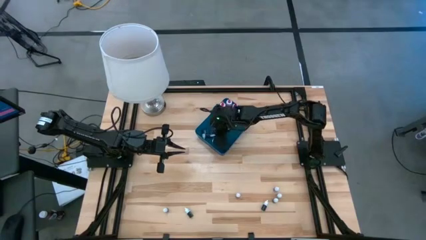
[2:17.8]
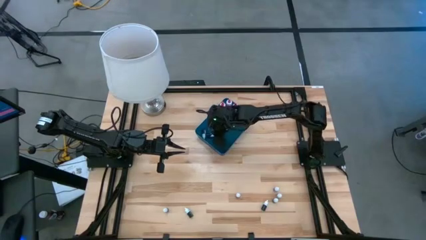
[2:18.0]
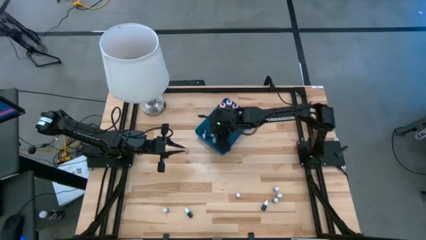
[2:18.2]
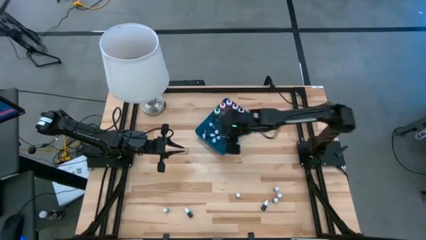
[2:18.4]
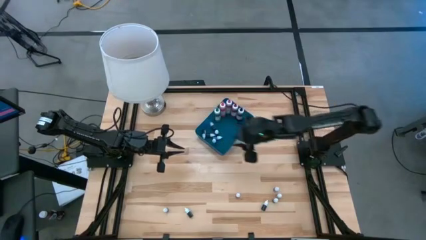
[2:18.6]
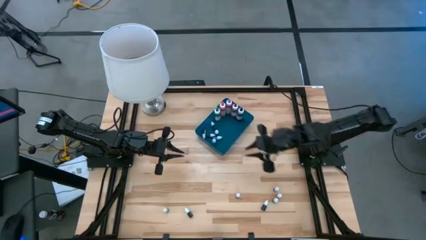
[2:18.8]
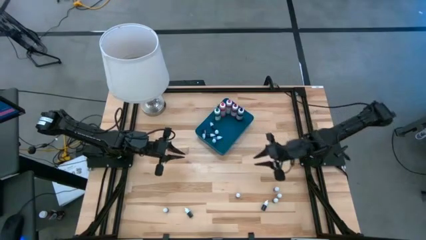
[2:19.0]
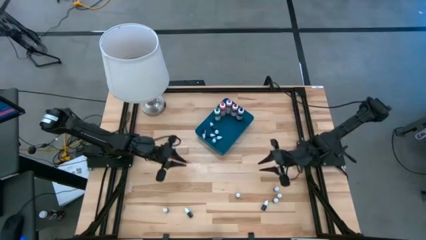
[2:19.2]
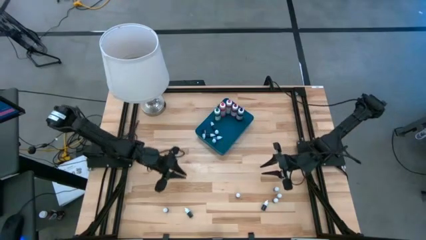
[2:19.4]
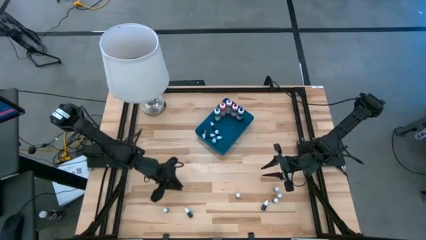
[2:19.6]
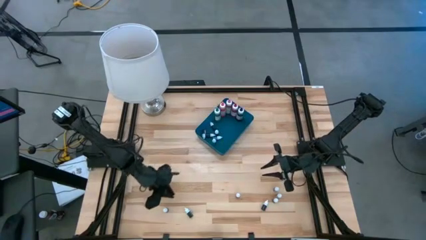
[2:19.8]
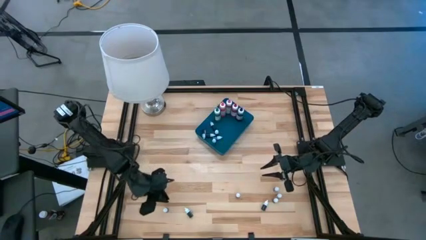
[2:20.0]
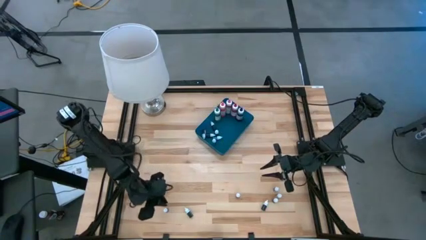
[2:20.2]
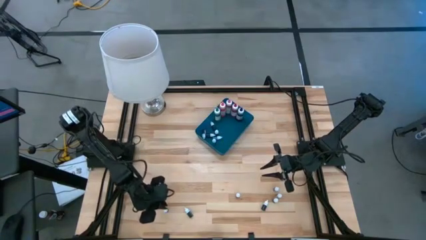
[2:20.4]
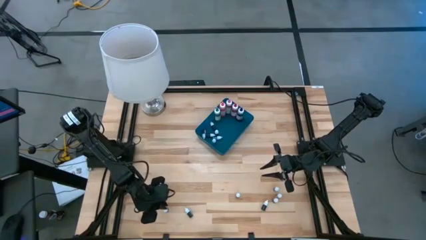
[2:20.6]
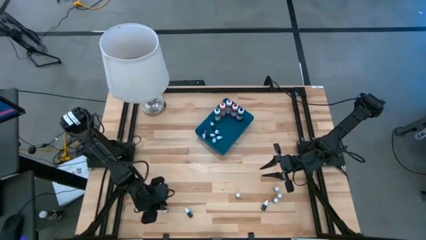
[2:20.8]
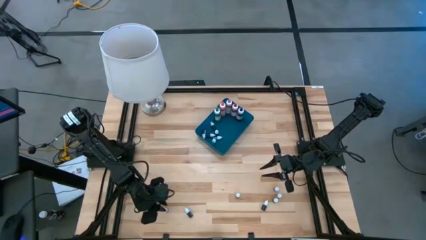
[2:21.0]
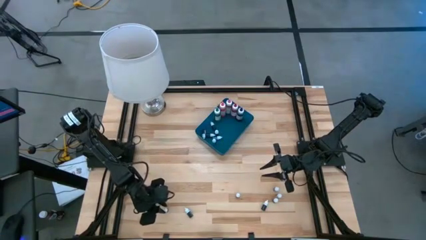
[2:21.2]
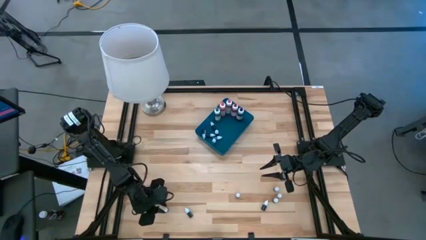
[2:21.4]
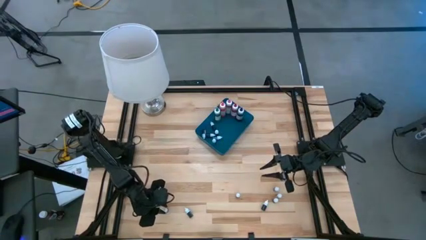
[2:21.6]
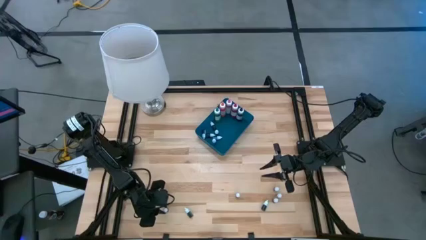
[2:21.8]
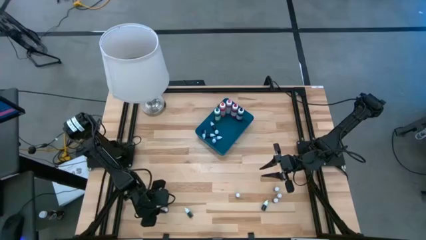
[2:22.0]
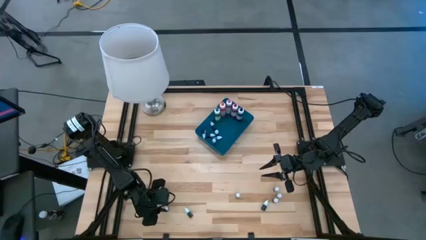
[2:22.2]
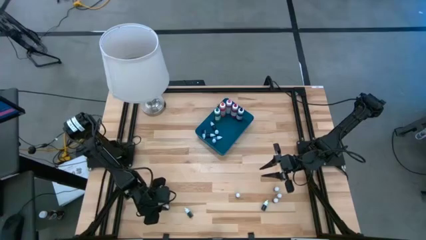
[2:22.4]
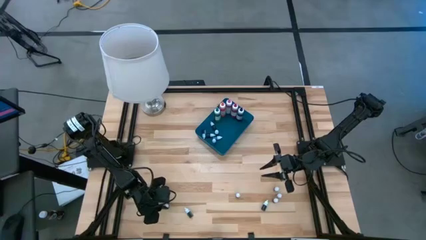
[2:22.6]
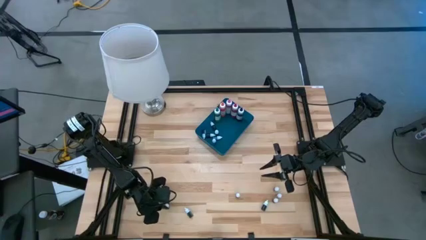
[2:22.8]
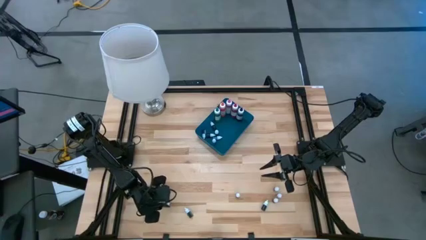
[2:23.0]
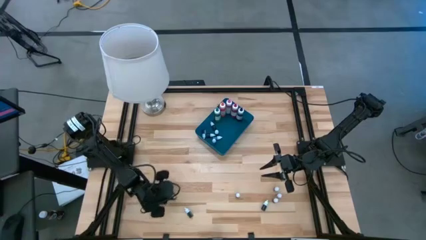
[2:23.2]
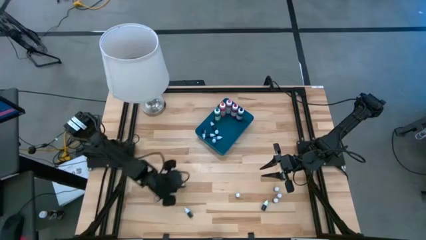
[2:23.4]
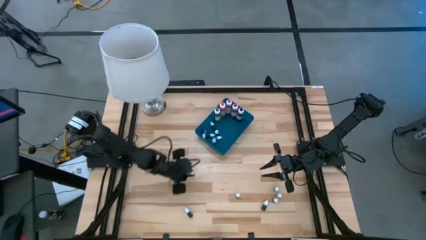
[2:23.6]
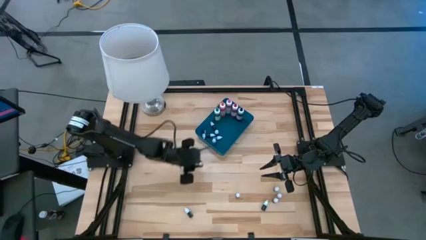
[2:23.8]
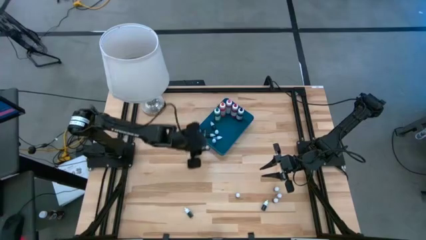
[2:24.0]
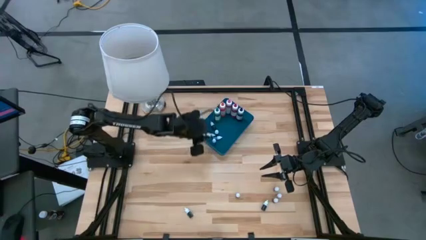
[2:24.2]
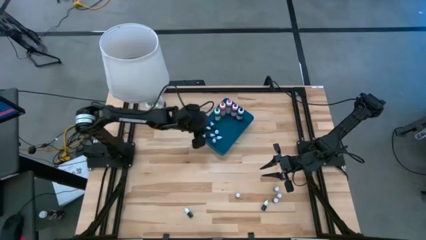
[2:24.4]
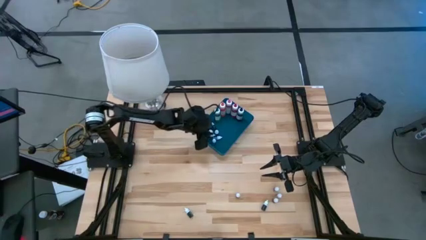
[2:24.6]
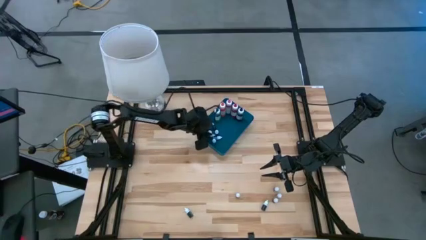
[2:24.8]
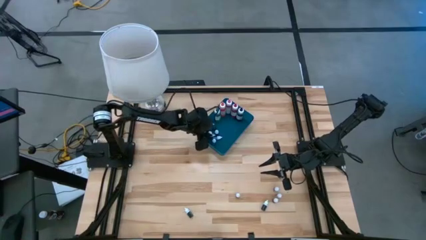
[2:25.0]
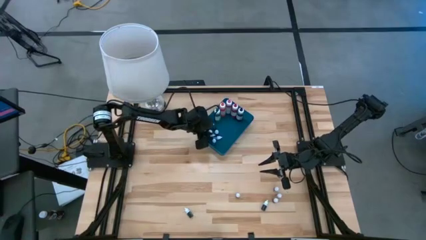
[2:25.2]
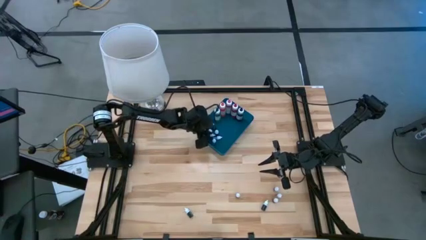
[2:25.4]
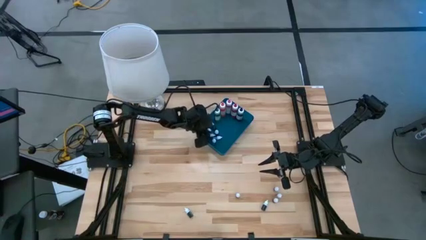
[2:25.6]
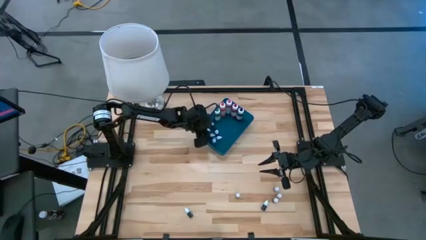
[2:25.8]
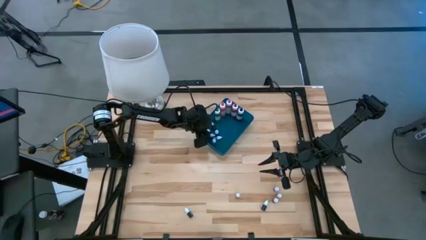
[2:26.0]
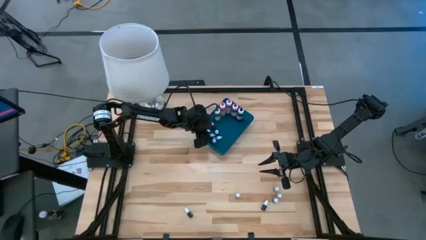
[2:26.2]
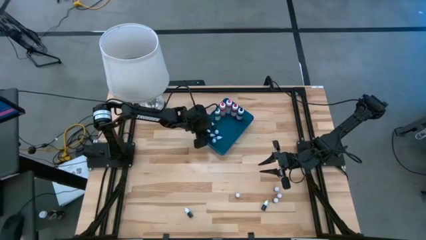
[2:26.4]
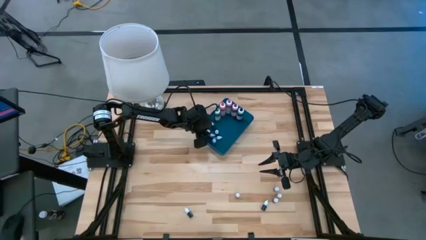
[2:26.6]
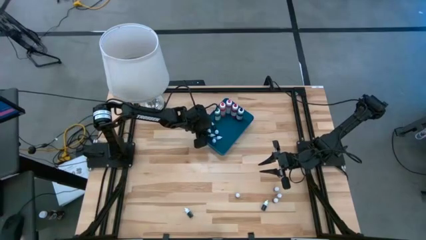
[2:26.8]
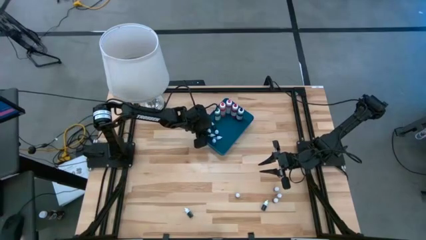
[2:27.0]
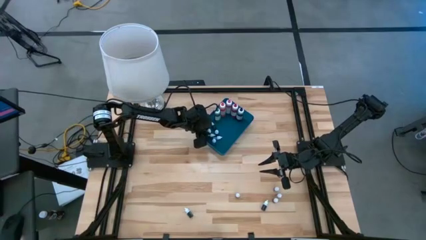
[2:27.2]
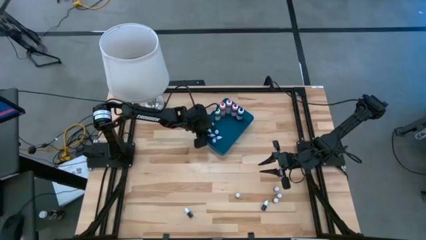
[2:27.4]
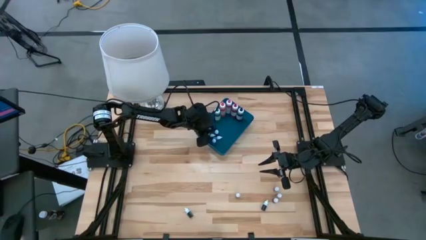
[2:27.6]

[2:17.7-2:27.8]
Task: Pick & Place food coloring
Put the small red food coloring bottle into the blue container

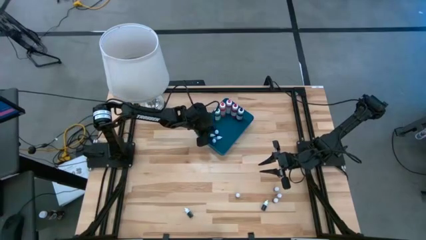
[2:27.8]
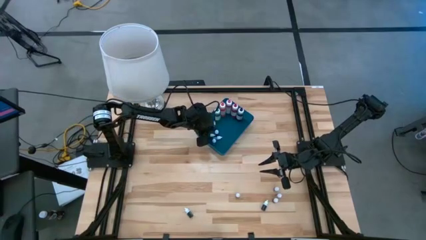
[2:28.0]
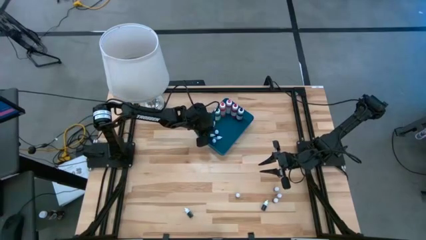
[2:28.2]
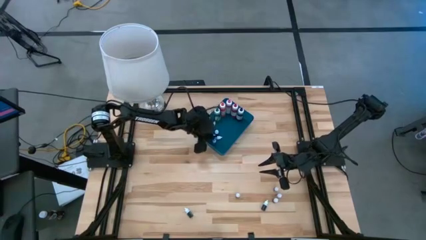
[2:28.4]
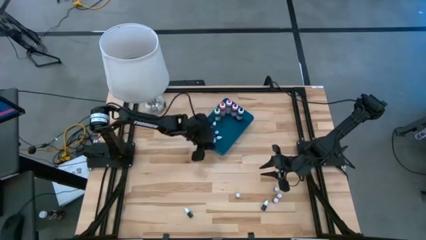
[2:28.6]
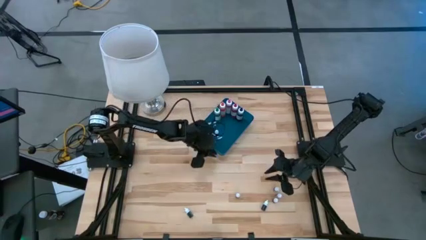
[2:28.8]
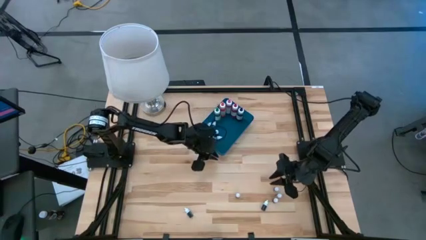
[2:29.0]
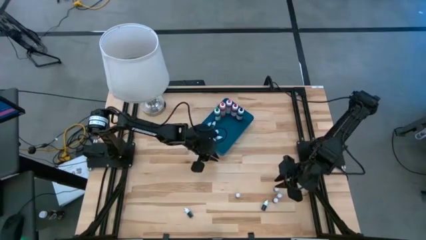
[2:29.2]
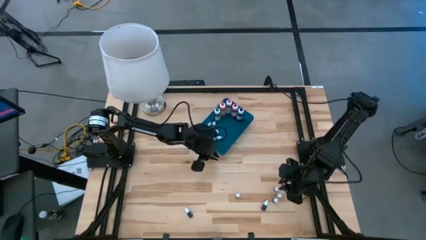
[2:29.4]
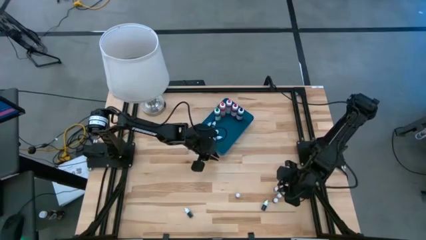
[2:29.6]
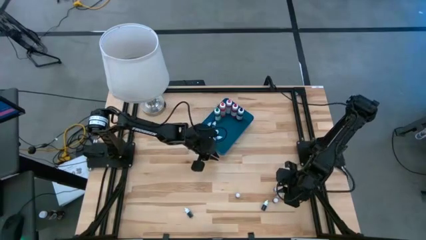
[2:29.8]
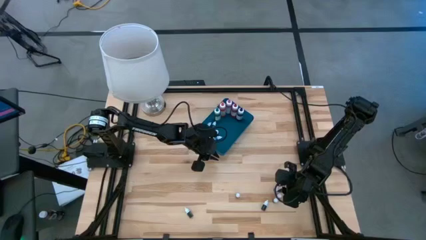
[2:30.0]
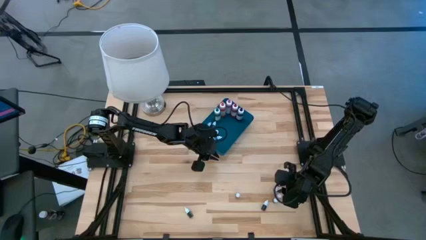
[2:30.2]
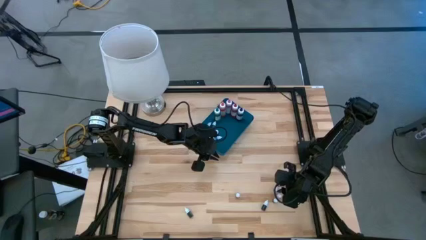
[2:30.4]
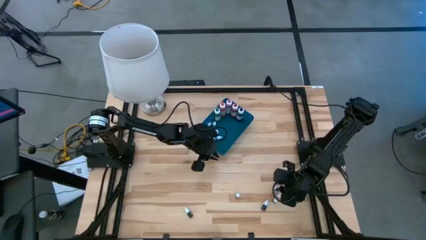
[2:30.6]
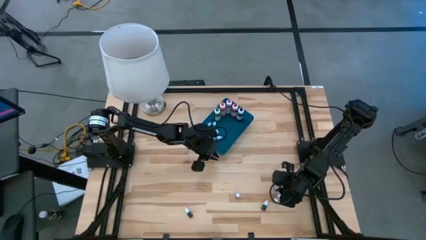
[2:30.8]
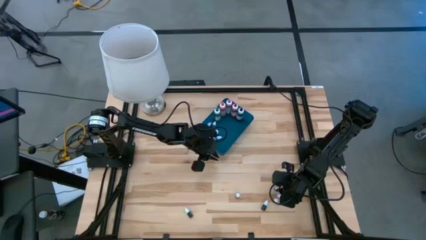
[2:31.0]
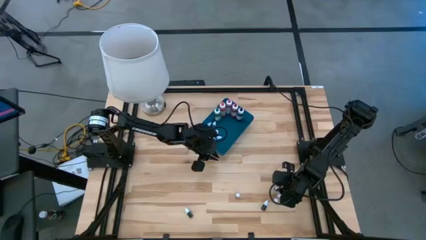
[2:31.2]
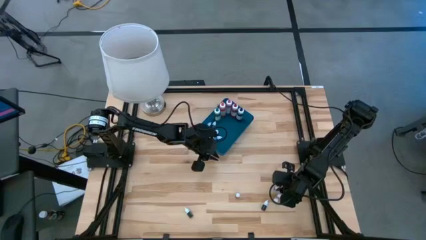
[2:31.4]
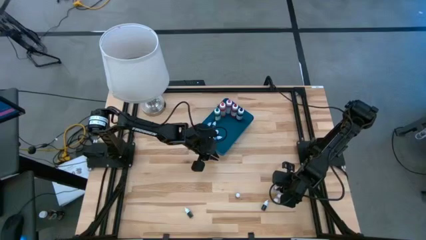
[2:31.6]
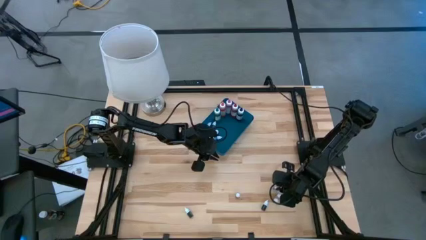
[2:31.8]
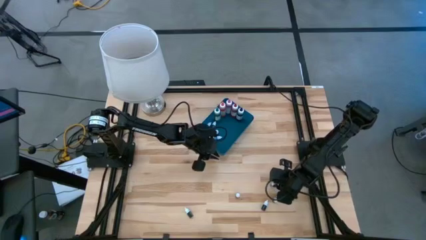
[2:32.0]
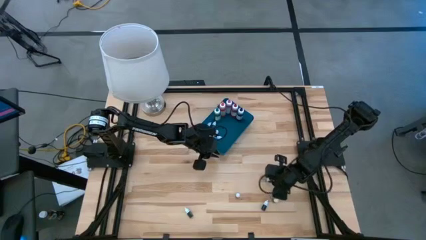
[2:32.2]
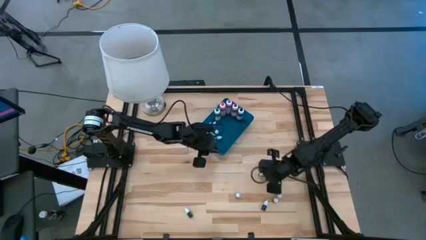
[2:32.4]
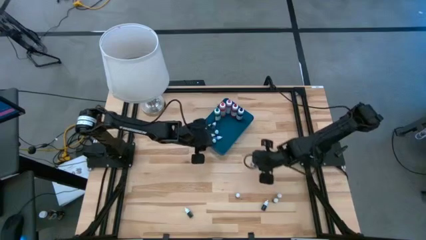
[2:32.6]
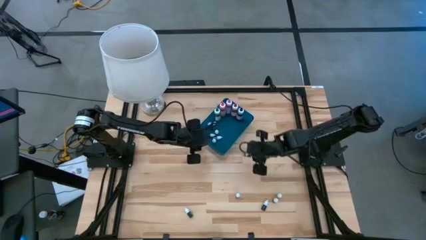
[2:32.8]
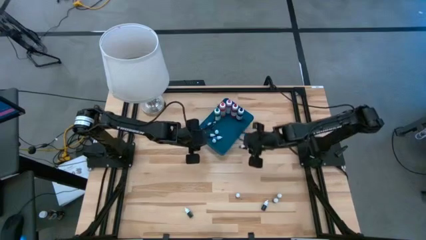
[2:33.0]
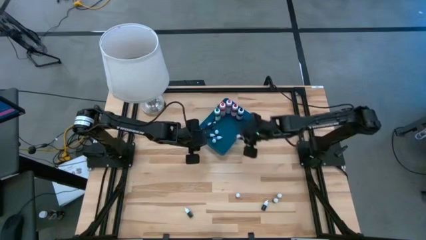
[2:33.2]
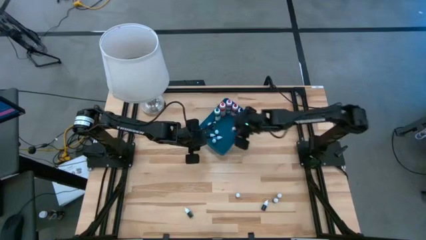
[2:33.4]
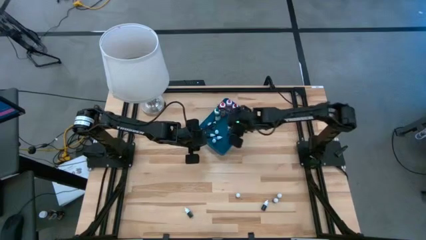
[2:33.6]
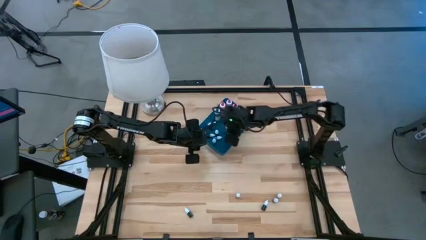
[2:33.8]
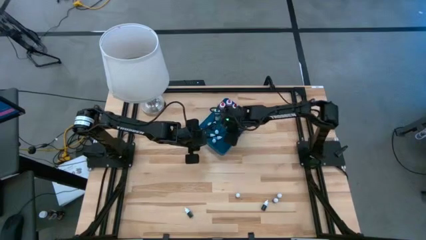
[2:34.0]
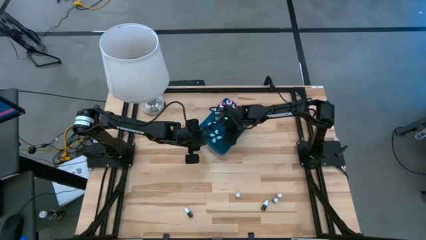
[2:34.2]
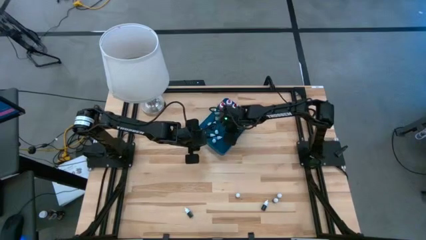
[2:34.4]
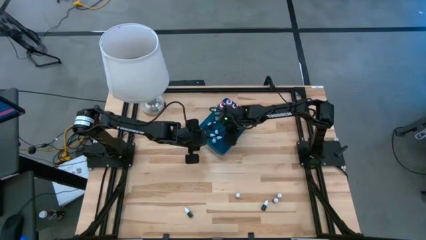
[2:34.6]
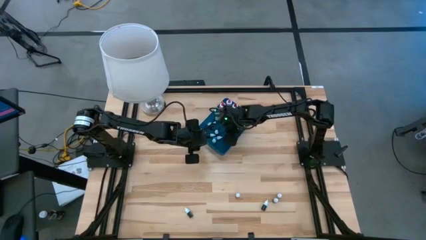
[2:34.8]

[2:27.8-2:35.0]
Put the small purple food coloring bottle into the blue container
